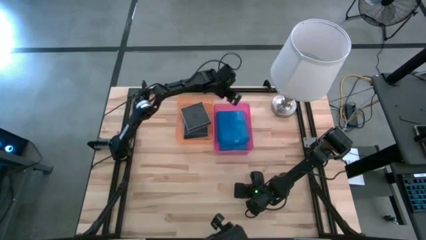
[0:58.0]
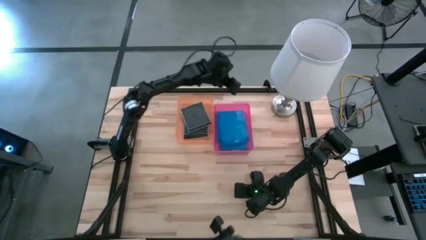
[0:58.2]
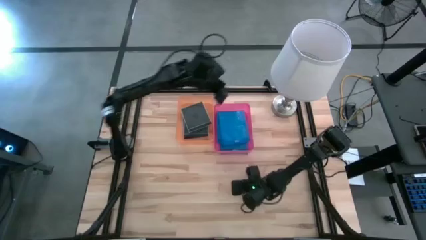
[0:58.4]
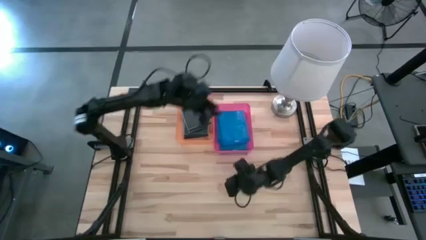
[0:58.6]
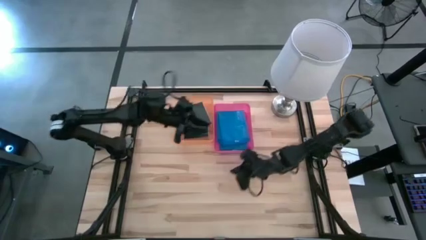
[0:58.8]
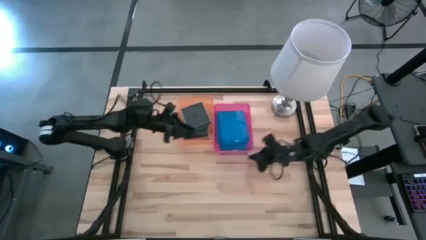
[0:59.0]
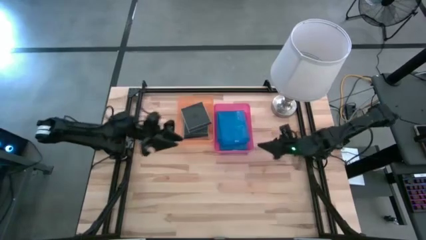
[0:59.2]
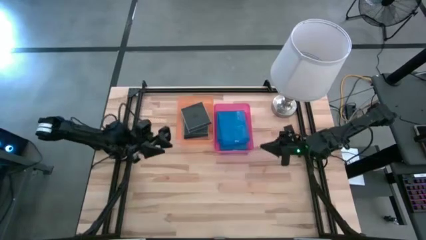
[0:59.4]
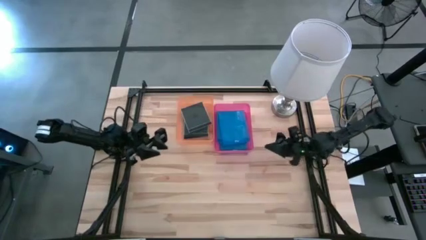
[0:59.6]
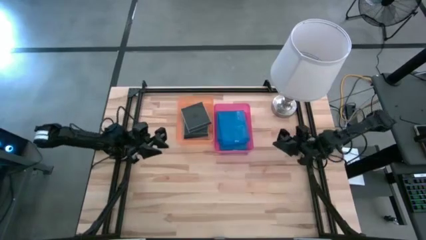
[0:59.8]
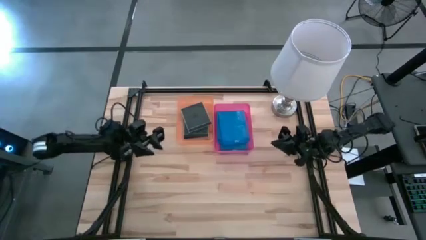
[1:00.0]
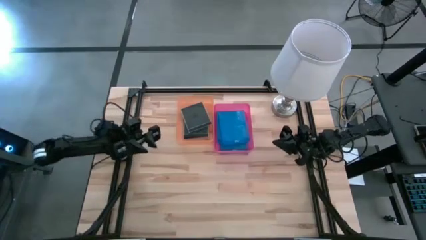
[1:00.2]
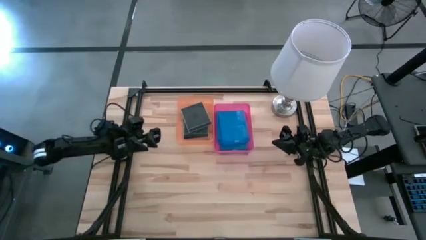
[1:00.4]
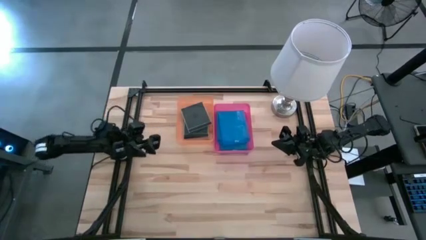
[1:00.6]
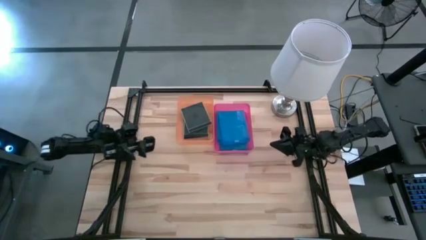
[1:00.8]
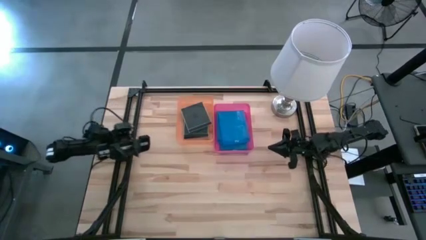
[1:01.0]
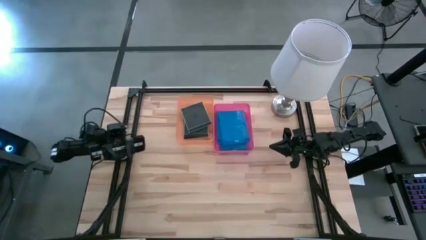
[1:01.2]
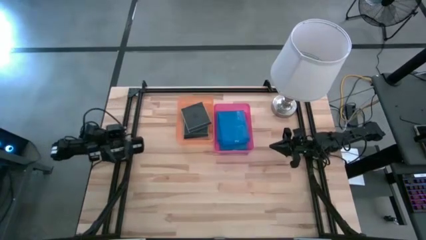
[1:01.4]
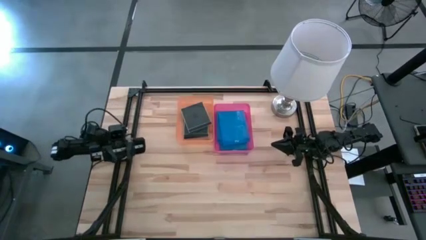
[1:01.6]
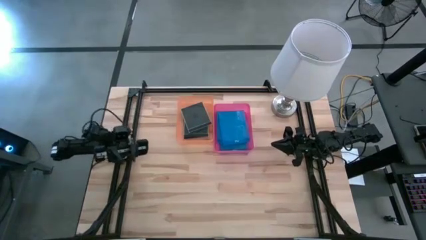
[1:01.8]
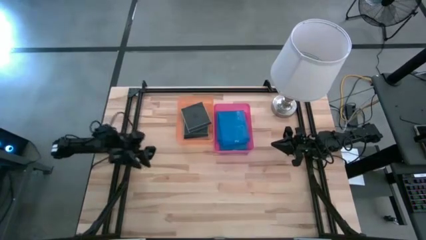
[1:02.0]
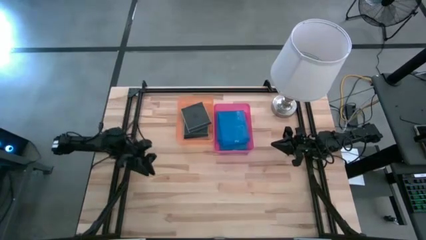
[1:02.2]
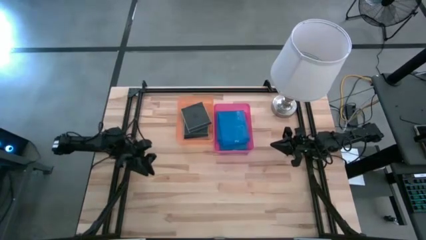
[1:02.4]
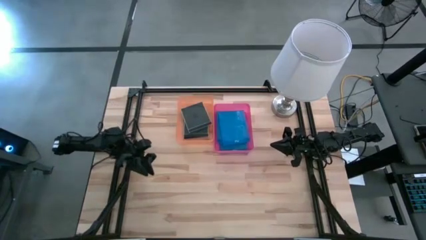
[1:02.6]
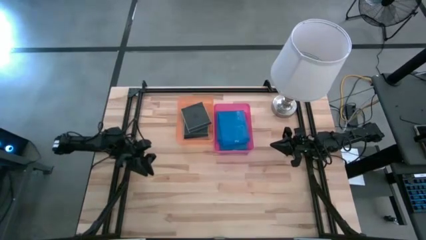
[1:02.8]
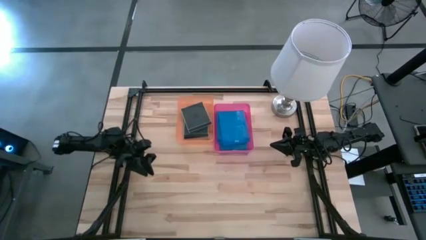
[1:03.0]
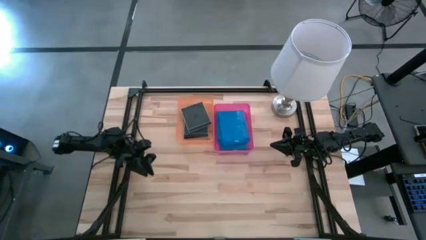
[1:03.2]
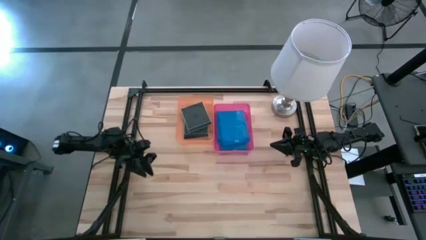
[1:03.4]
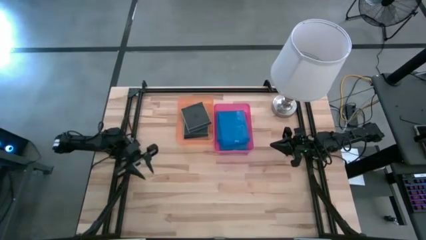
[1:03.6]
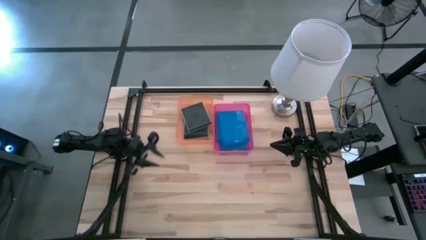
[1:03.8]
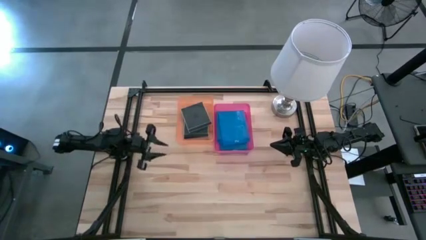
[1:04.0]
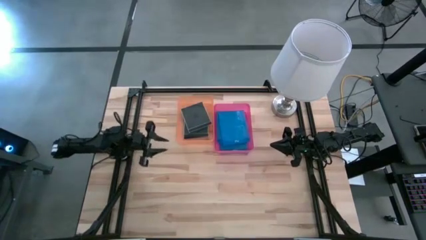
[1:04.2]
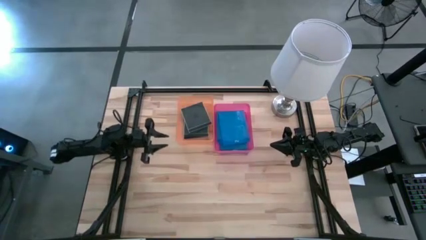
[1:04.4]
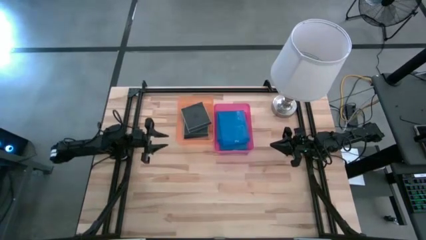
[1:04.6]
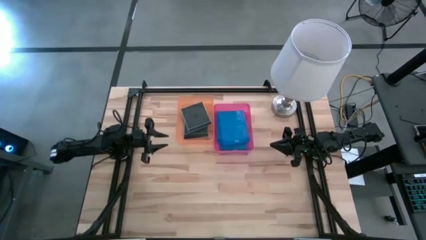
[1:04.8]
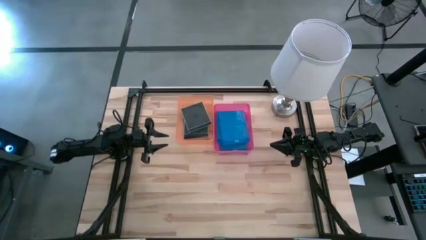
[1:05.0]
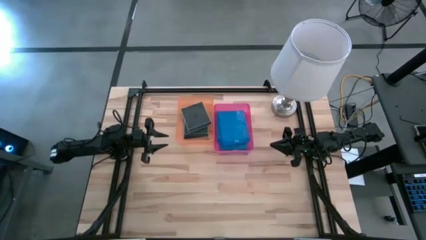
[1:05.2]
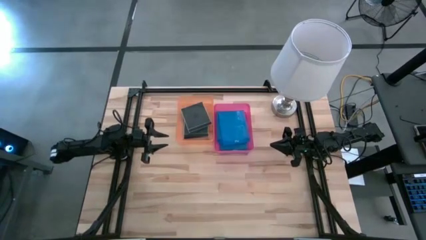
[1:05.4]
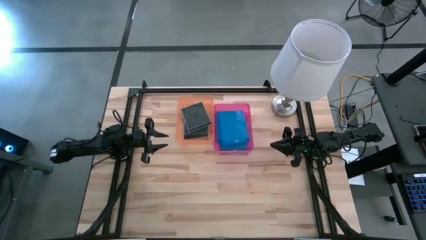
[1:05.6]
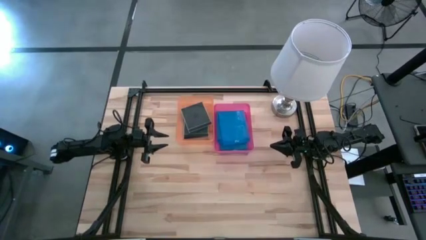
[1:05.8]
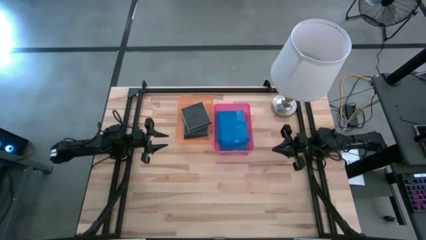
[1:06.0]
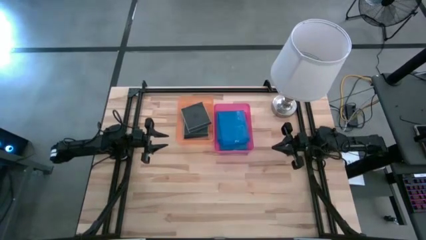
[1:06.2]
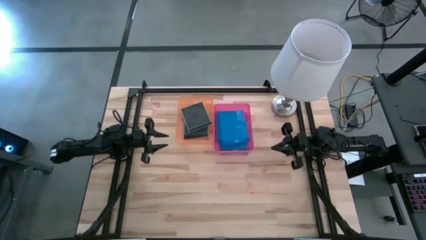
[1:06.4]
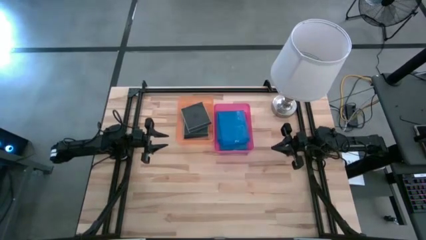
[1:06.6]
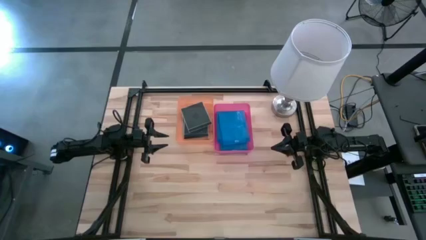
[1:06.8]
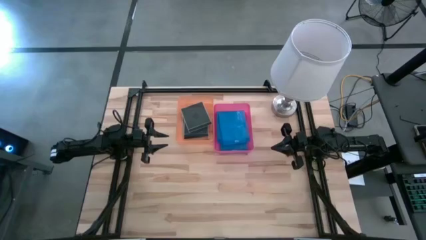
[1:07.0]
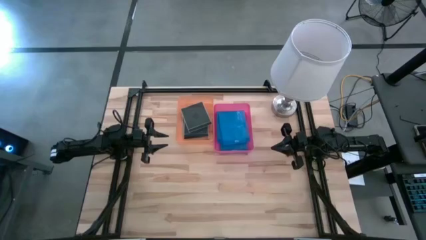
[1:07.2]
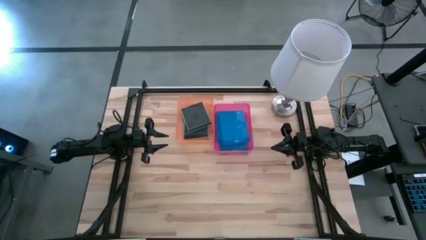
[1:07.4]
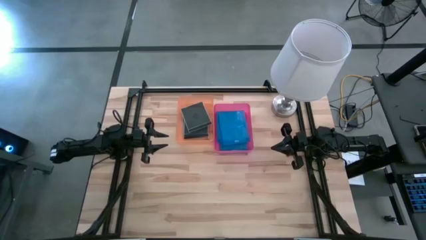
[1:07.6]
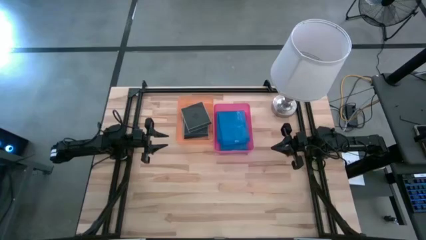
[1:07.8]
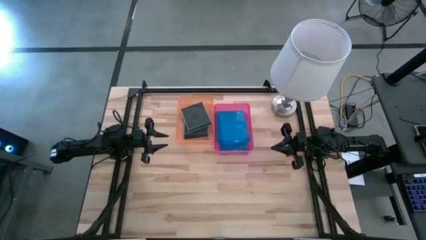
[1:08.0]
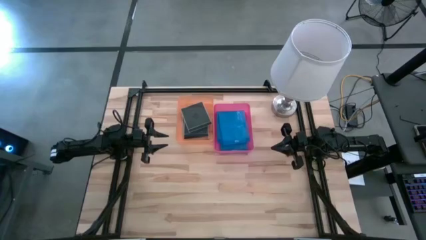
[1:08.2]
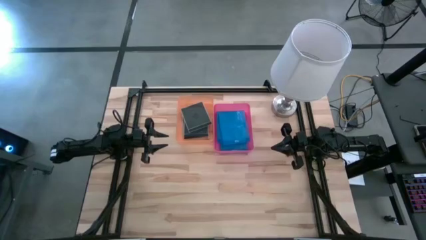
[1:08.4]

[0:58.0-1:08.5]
Task: Pick & place jewel cases by type
Return to Home Position
